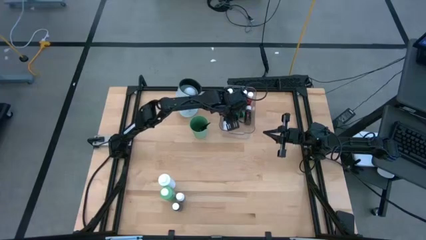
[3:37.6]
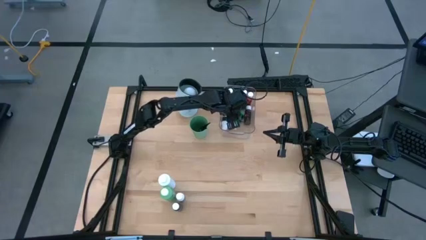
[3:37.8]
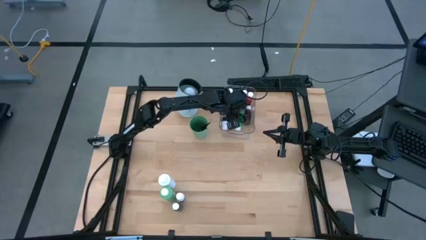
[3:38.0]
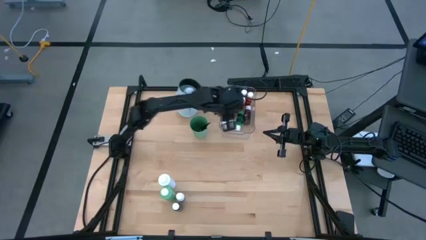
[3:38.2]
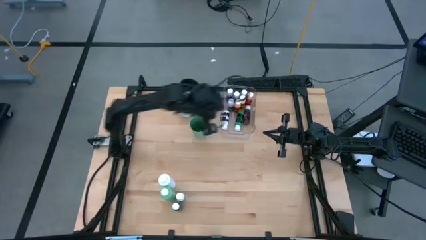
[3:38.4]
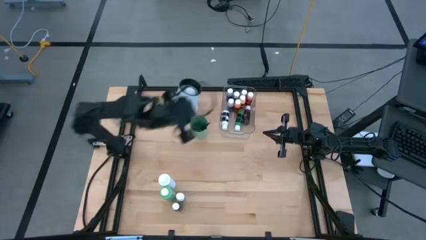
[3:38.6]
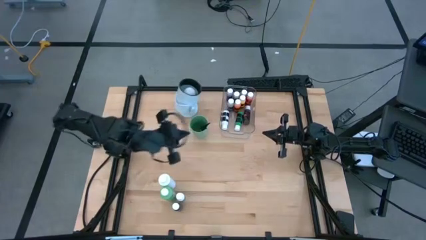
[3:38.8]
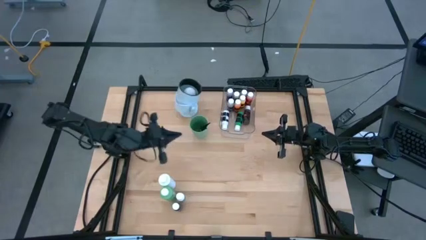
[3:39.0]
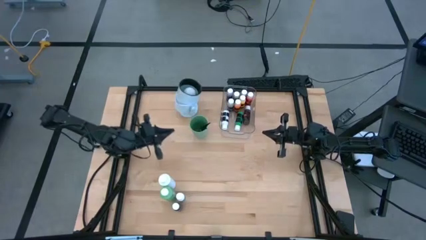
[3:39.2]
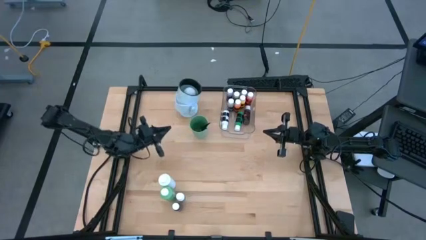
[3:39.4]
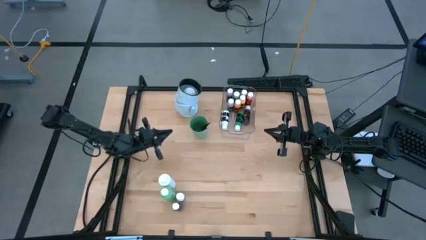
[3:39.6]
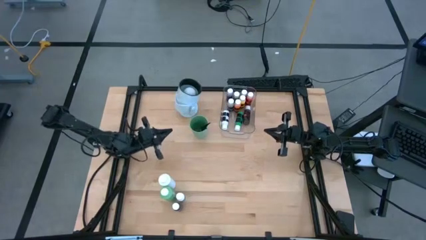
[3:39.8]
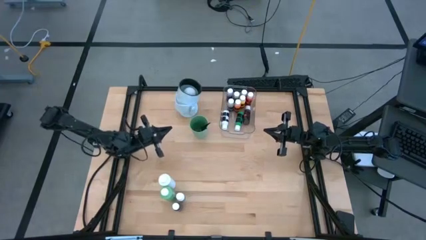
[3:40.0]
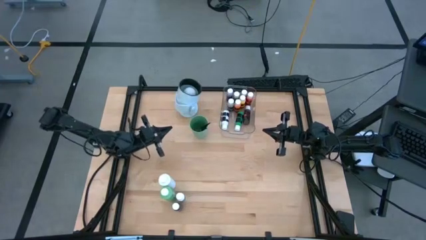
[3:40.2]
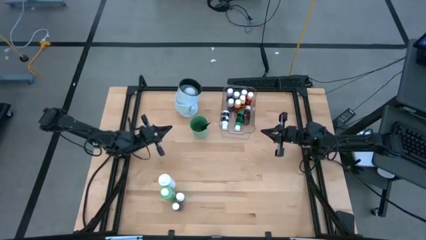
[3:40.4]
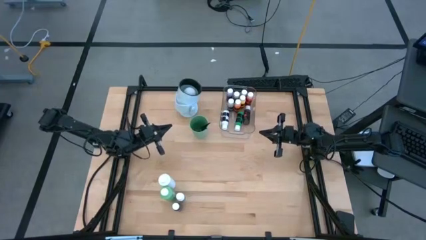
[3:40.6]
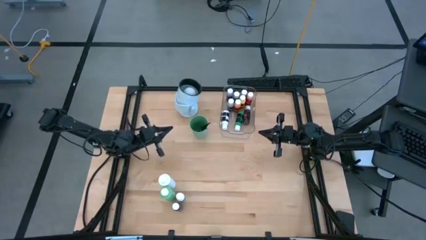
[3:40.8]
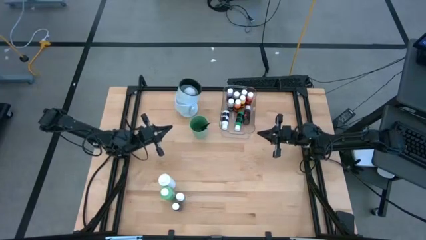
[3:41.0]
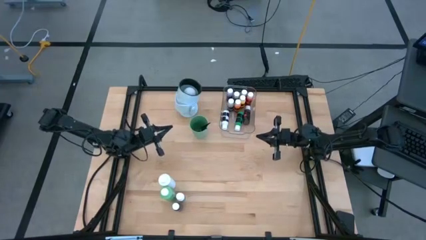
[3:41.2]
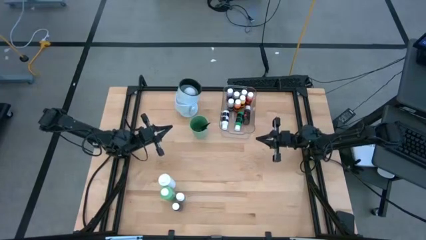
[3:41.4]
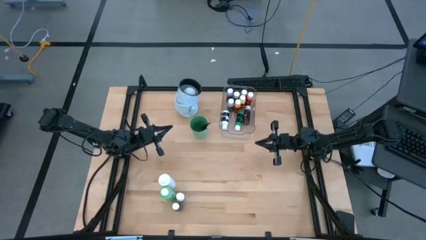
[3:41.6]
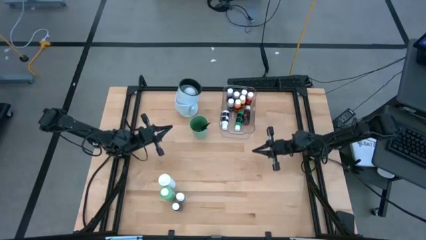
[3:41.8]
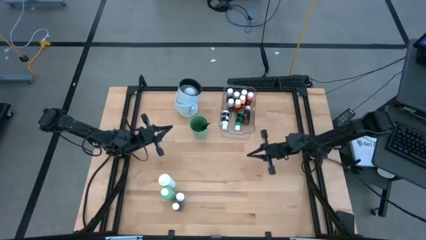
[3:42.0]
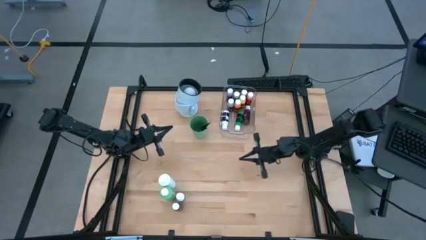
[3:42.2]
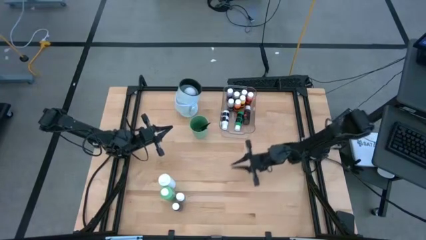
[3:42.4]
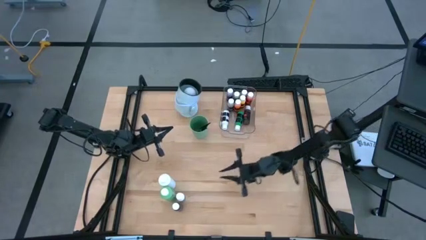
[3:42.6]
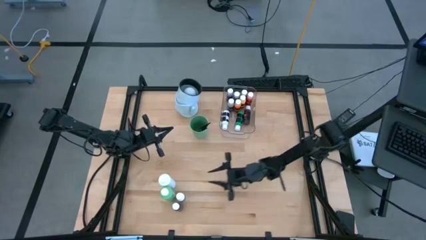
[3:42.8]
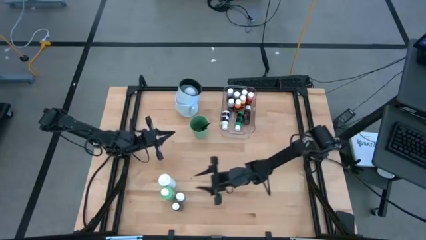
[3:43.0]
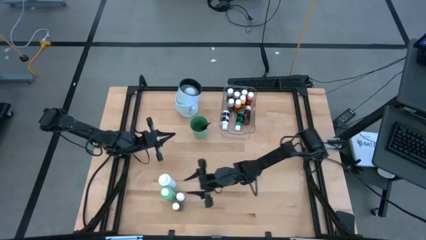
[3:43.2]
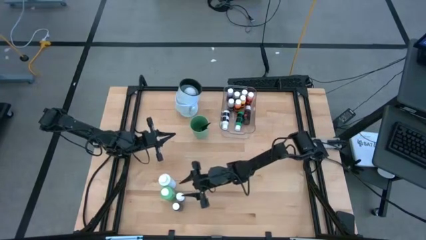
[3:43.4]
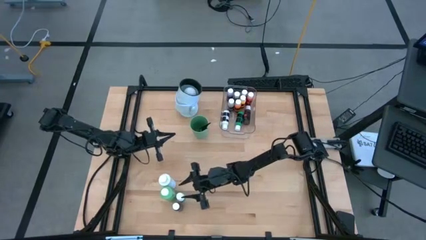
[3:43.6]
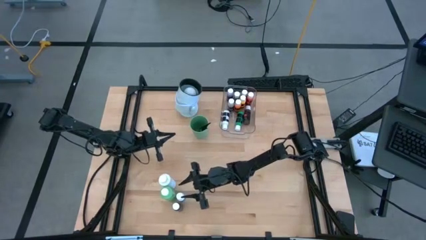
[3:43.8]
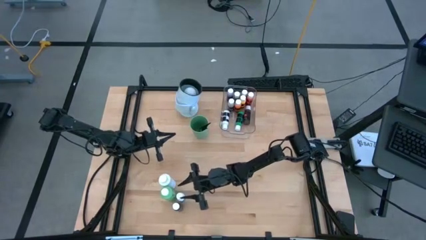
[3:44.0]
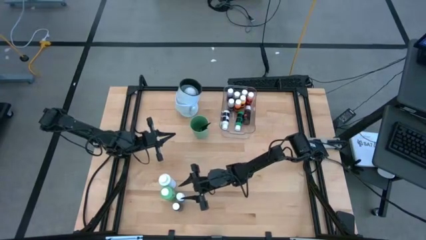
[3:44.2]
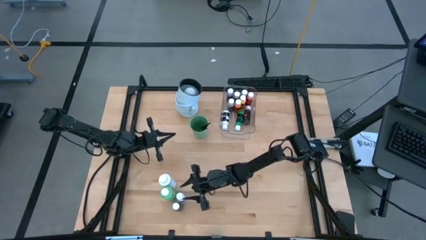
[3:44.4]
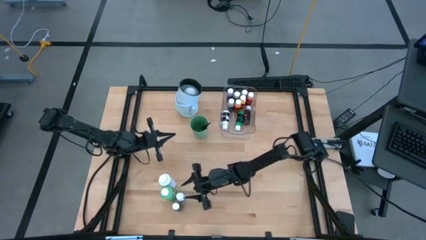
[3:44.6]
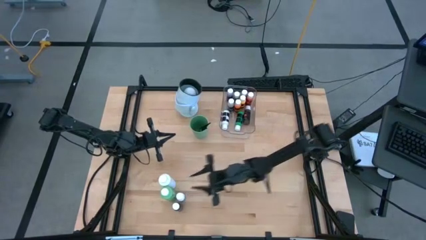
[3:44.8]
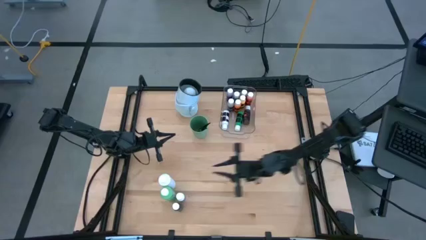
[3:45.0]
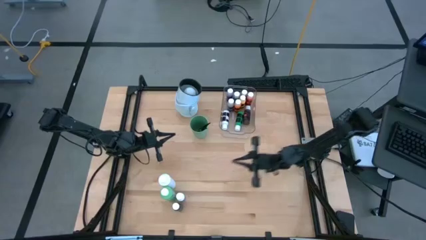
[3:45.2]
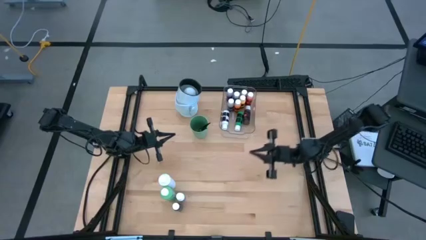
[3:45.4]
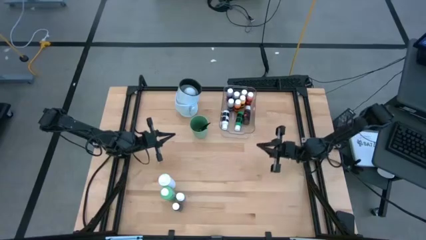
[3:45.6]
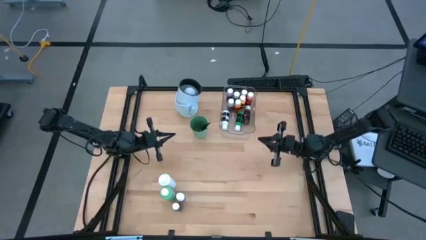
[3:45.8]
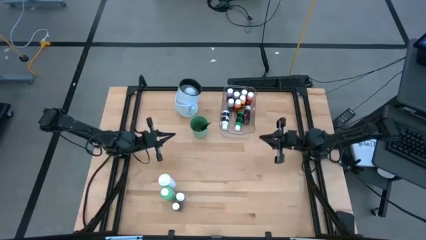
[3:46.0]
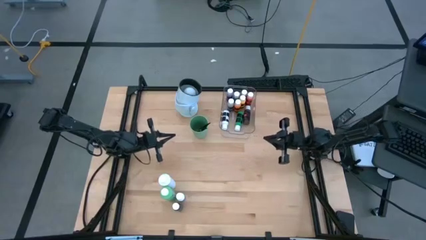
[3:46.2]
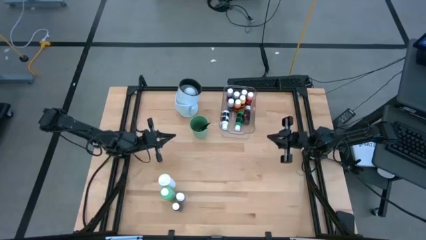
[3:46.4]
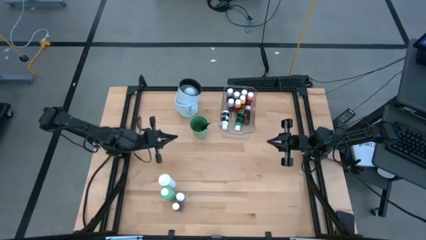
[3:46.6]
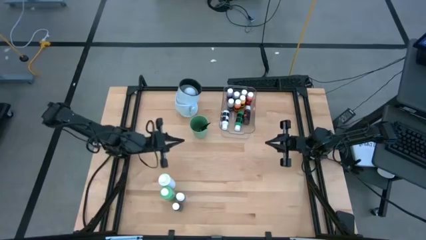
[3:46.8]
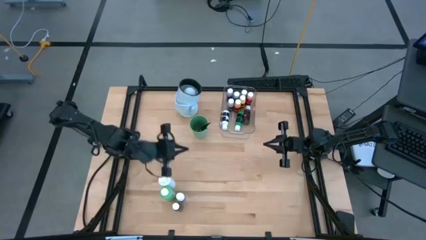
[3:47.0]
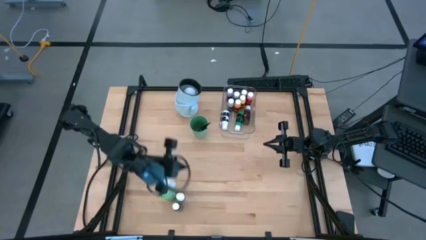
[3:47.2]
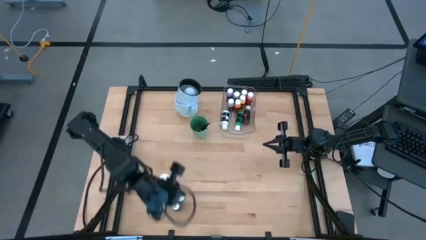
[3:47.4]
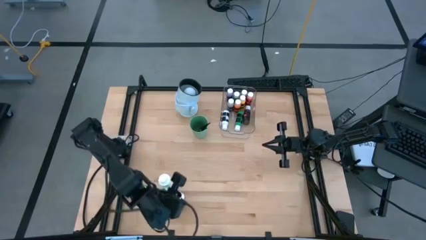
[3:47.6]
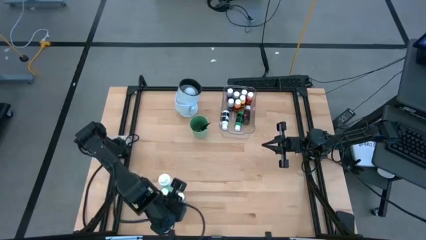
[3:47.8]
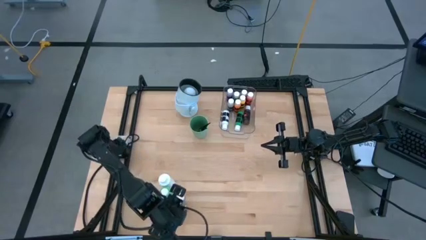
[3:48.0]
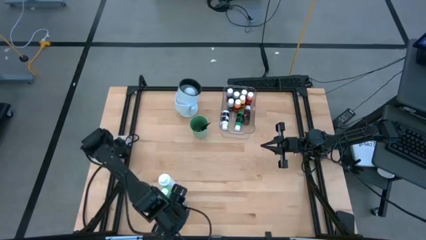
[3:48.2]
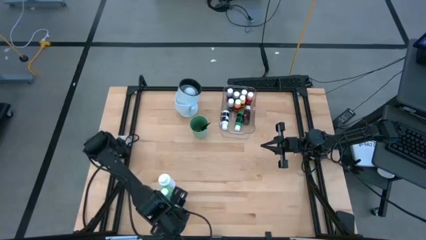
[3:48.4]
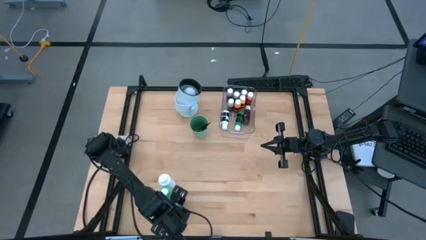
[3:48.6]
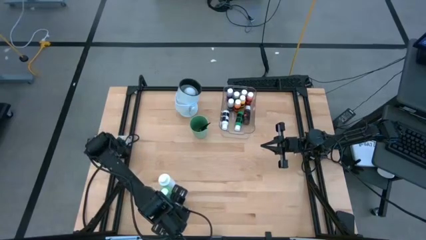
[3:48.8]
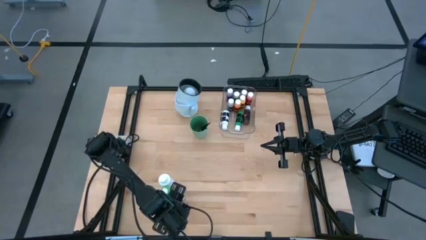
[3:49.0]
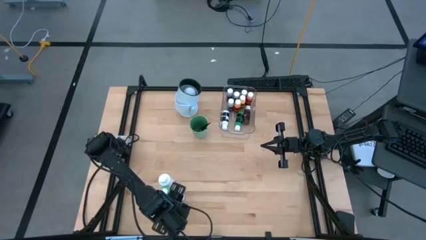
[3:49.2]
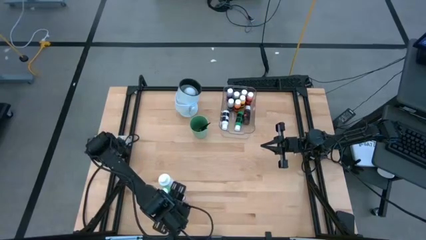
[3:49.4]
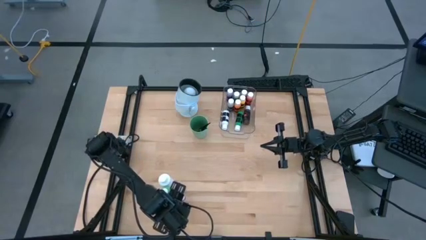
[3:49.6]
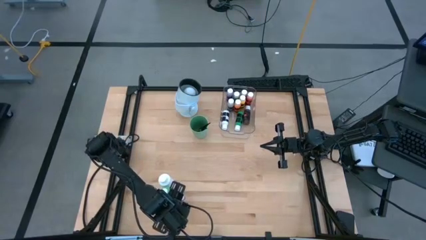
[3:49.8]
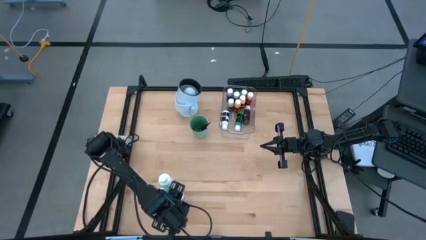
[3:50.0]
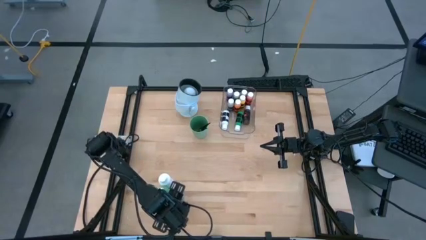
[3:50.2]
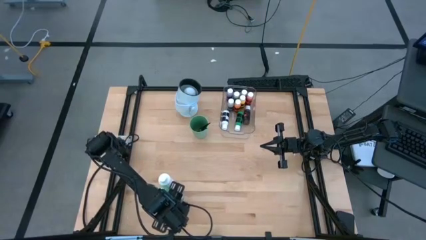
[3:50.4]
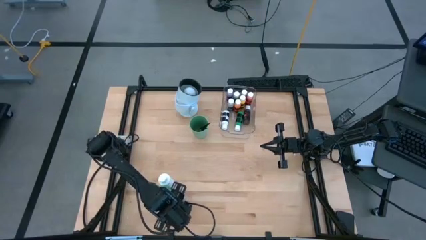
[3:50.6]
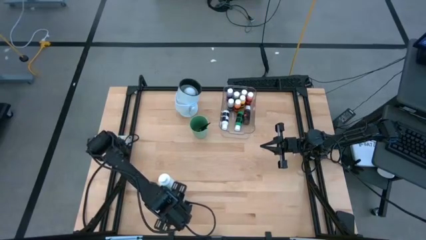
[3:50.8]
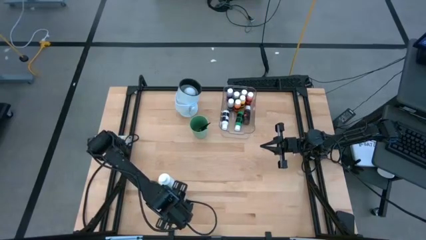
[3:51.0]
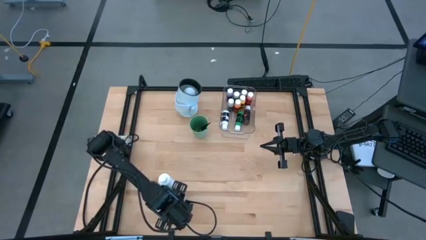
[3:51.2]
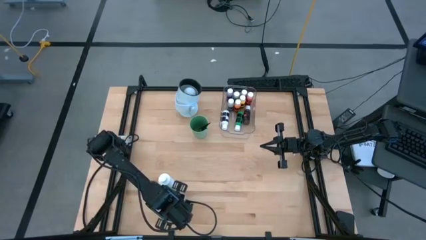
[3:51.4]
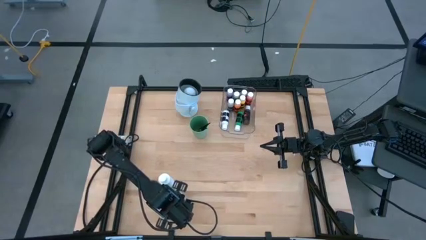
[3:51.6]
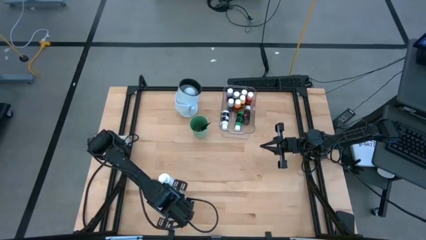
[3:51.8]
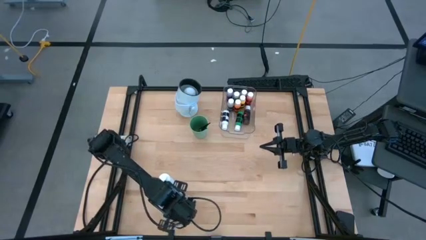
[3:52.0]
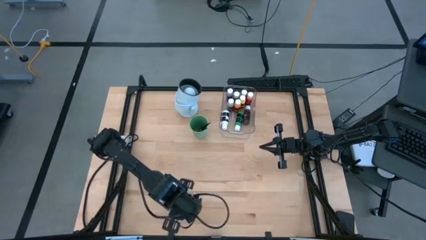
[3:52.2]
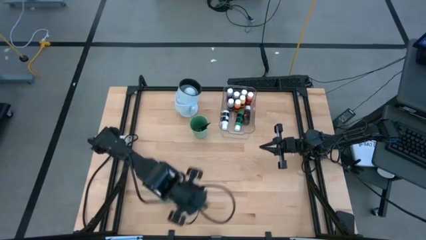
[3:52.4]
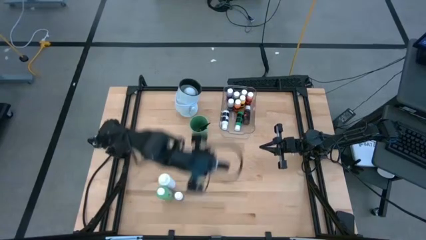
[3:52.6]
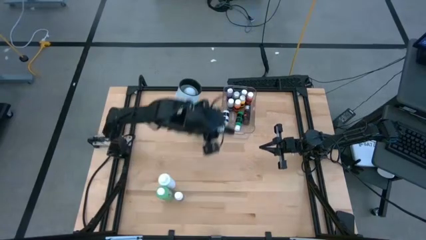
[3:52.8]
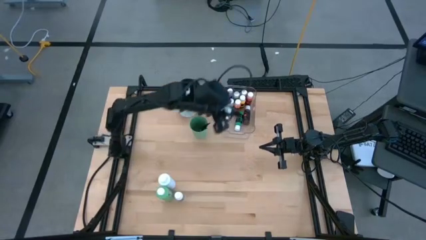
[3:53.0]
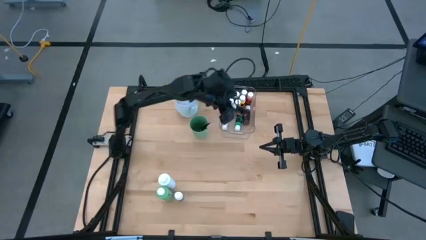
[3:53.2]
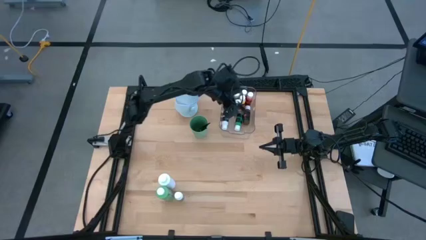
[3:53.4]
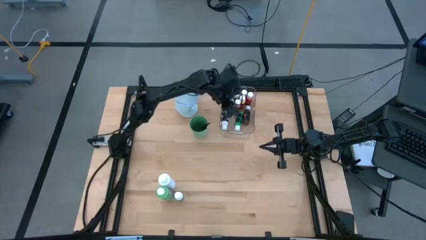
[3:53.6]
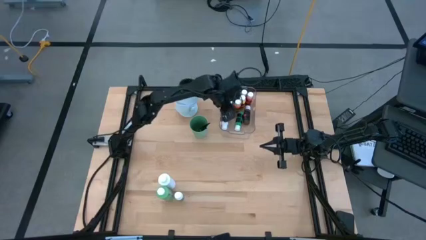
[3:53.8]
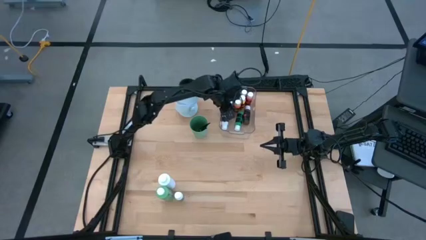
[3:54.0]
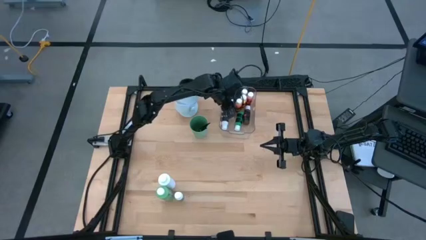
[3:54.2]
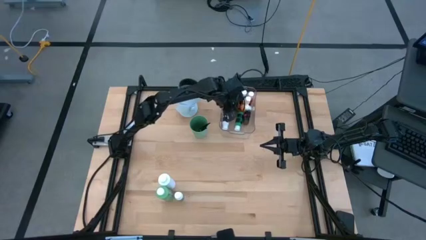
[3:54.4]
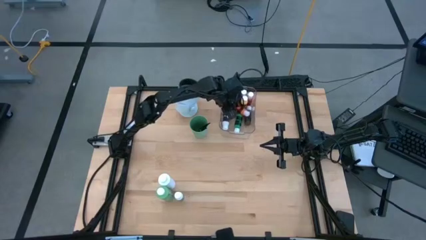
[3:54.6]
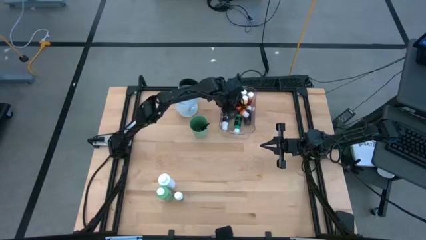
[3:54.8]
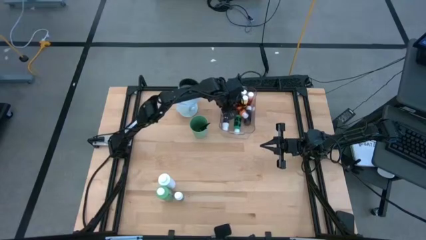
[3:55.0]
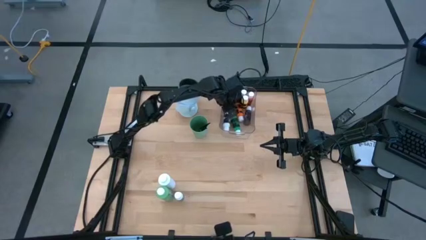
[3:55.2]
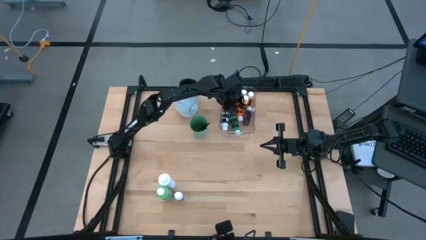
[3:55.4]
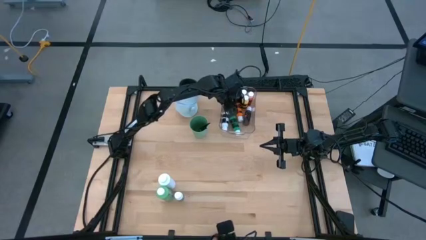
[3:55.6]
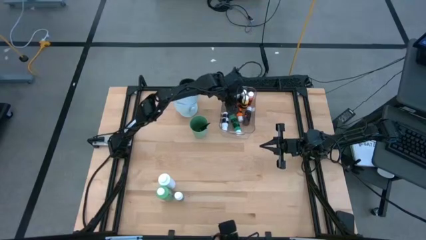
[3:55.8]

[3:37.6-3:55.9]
Task: Pick & Place Paint Supplies
Put the black paint bottle into the transparent bin
